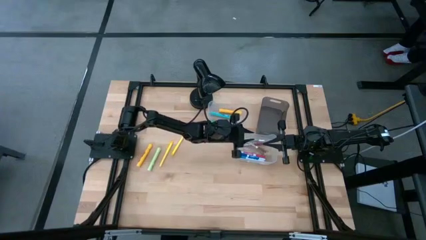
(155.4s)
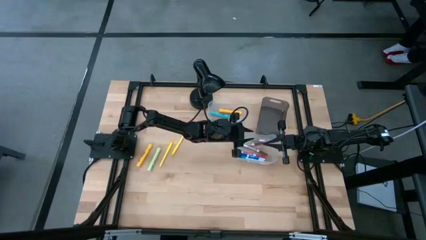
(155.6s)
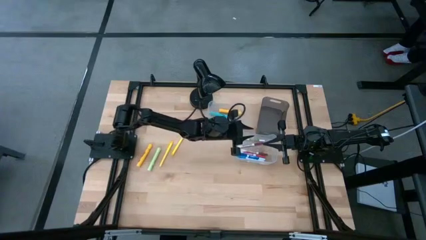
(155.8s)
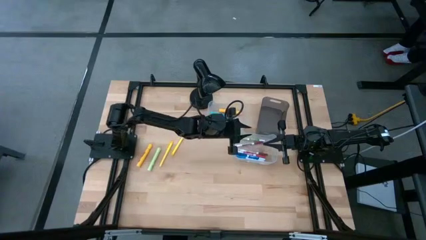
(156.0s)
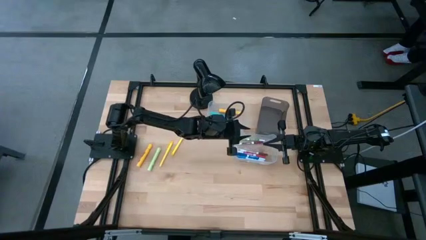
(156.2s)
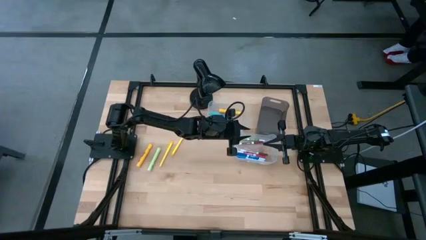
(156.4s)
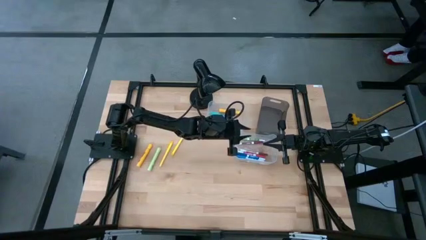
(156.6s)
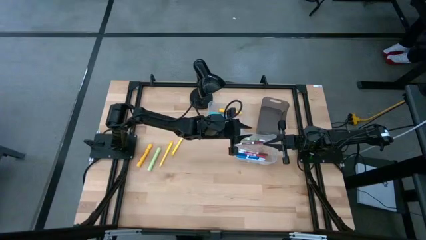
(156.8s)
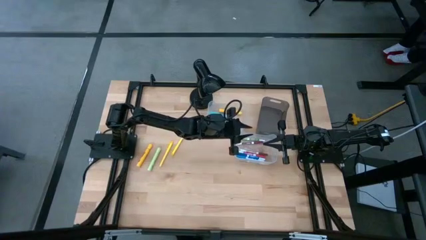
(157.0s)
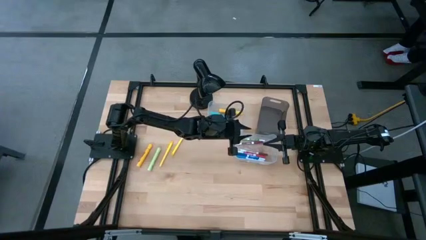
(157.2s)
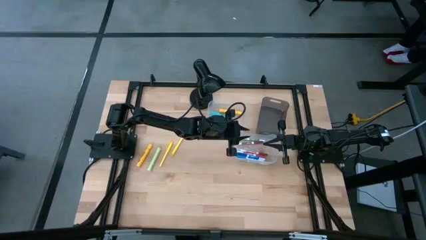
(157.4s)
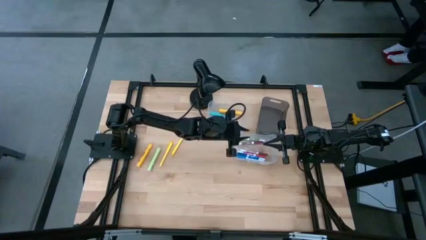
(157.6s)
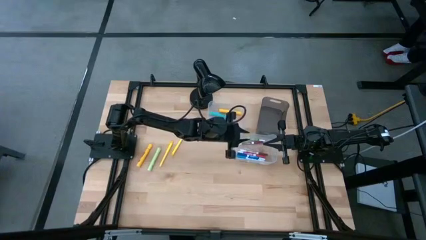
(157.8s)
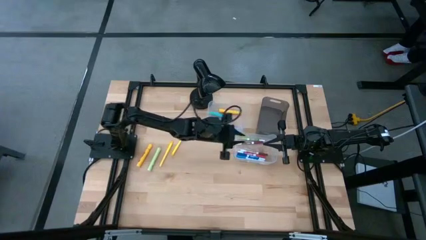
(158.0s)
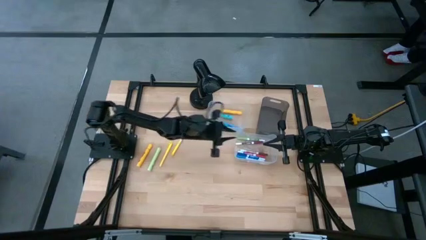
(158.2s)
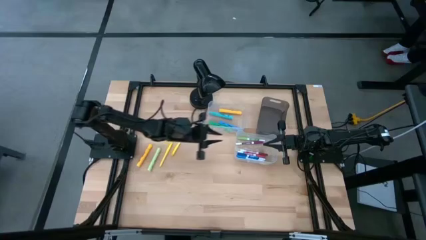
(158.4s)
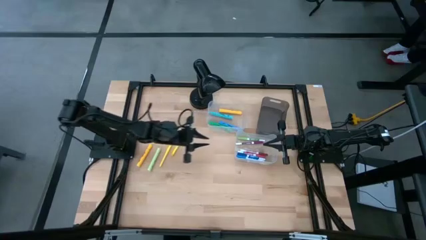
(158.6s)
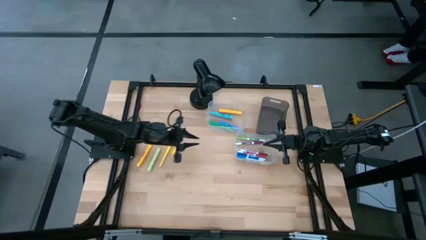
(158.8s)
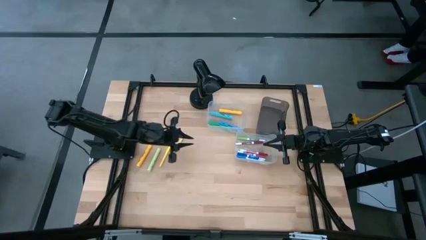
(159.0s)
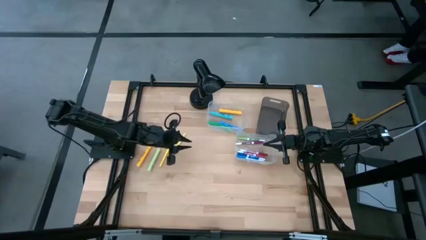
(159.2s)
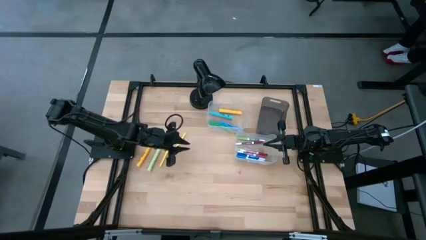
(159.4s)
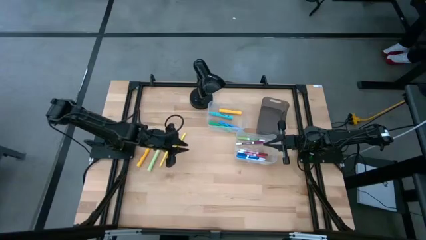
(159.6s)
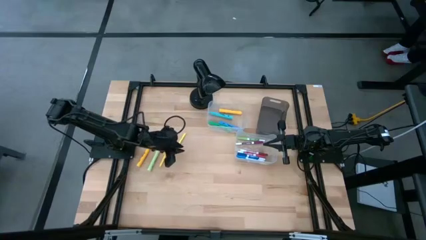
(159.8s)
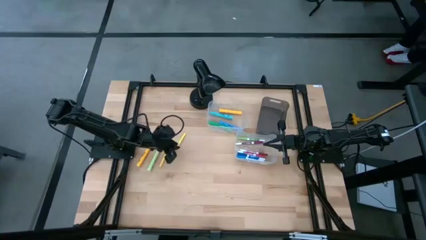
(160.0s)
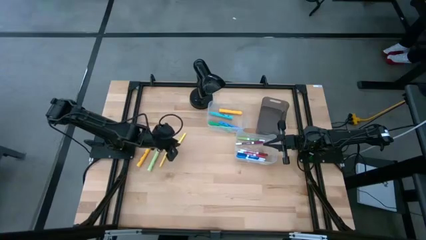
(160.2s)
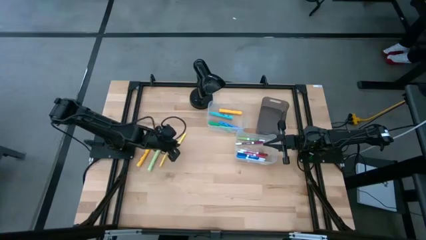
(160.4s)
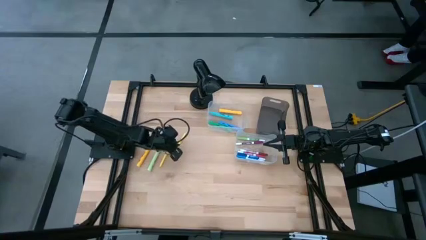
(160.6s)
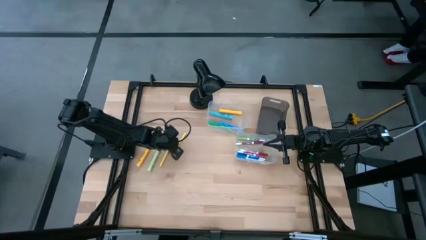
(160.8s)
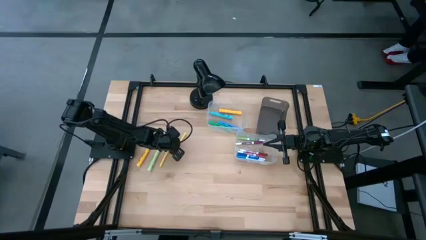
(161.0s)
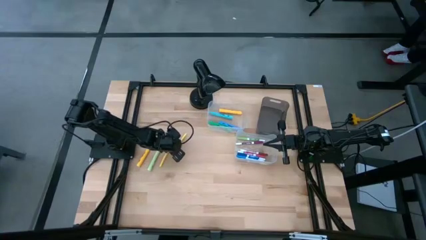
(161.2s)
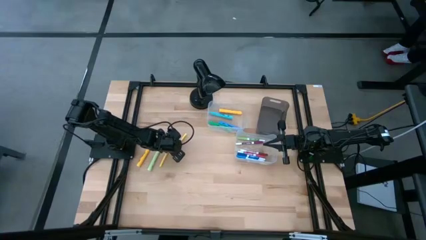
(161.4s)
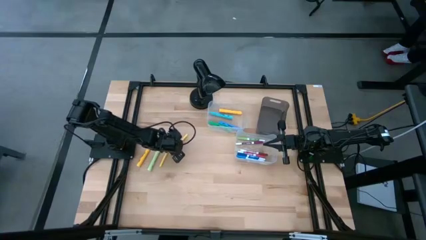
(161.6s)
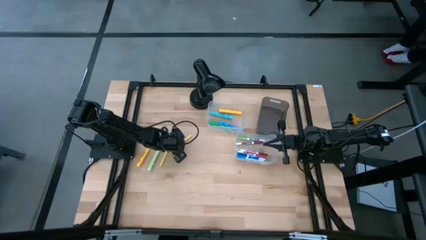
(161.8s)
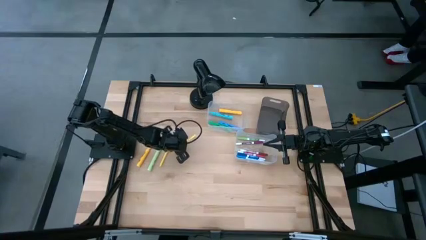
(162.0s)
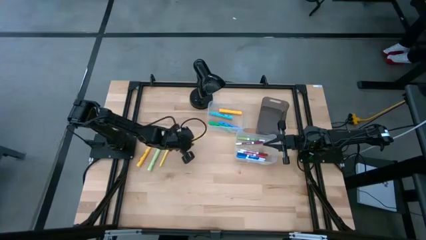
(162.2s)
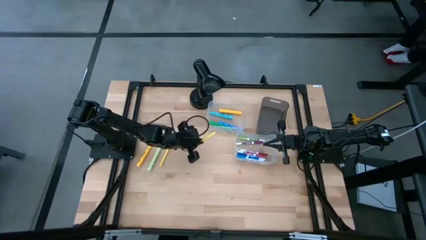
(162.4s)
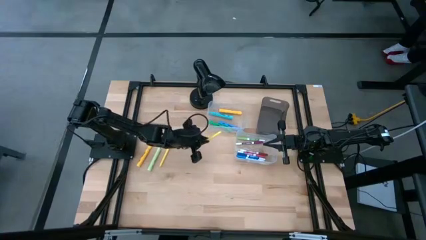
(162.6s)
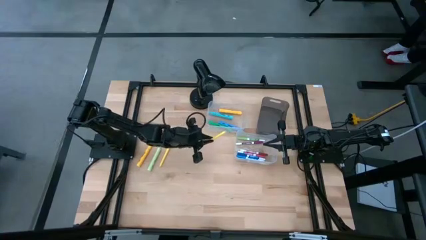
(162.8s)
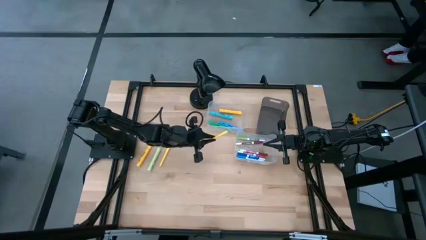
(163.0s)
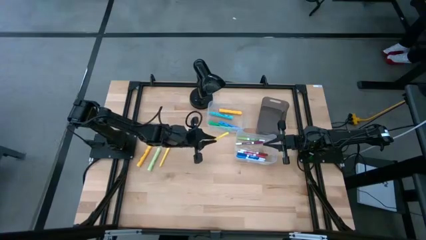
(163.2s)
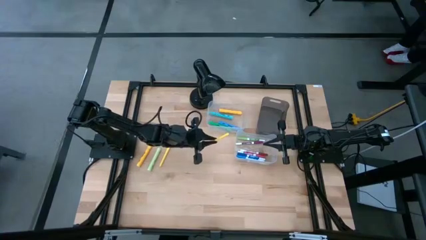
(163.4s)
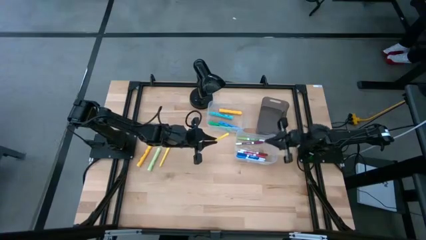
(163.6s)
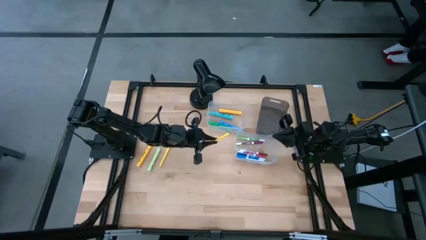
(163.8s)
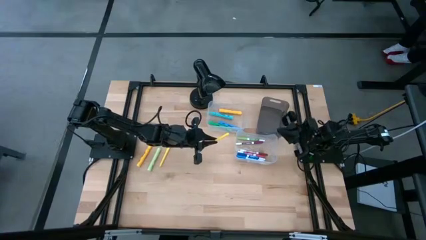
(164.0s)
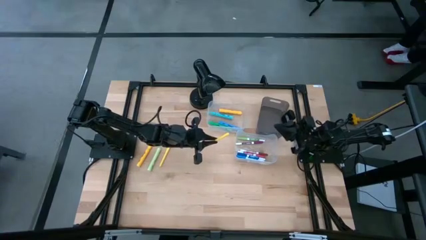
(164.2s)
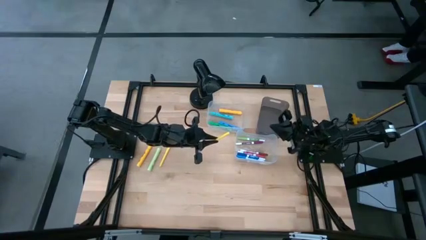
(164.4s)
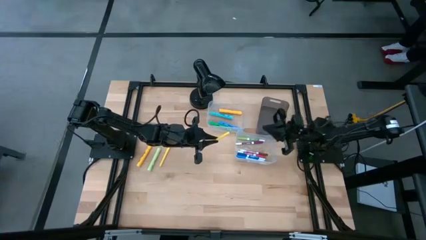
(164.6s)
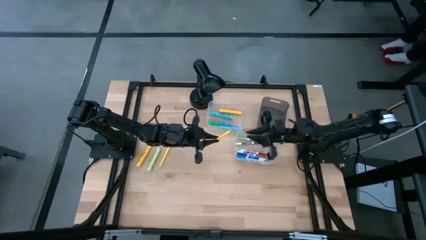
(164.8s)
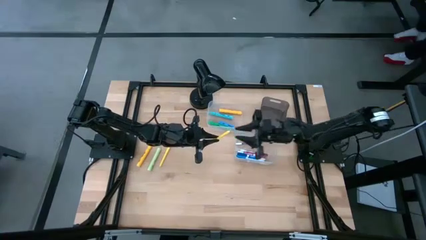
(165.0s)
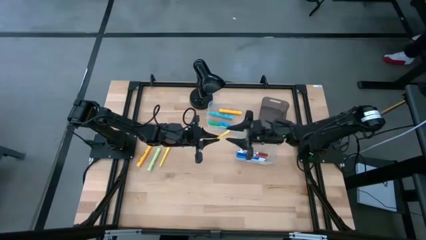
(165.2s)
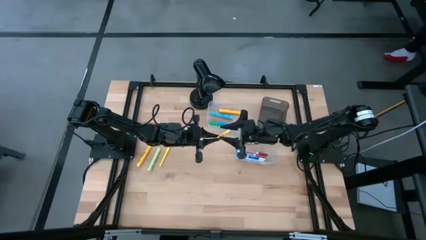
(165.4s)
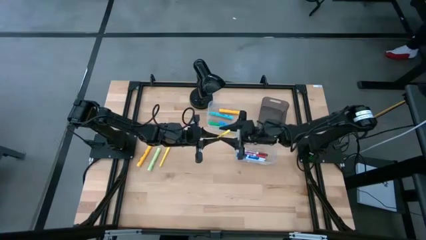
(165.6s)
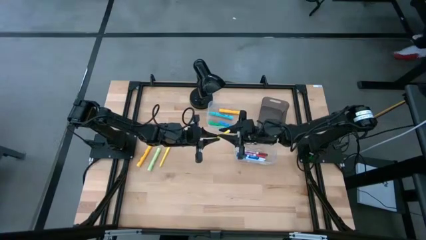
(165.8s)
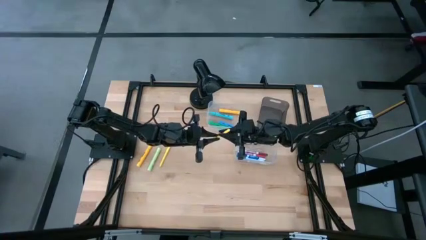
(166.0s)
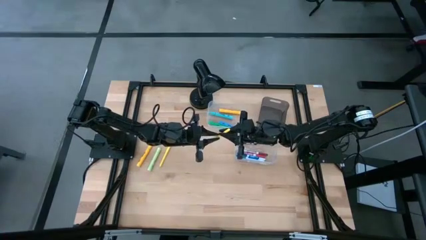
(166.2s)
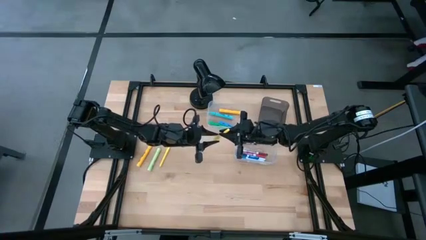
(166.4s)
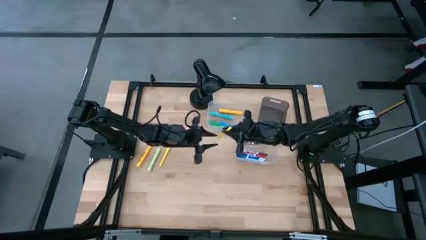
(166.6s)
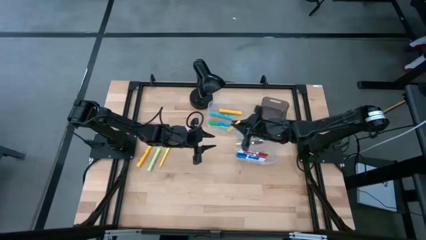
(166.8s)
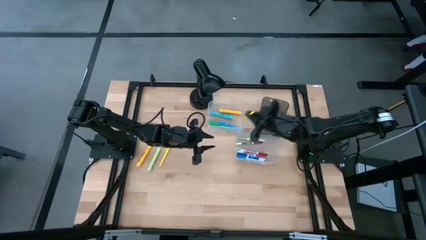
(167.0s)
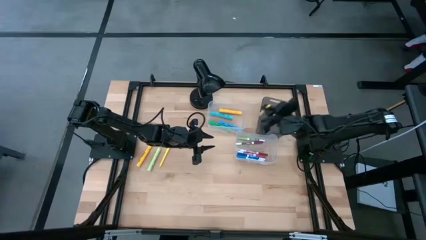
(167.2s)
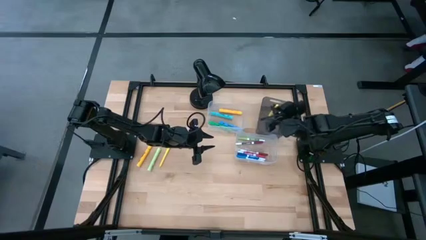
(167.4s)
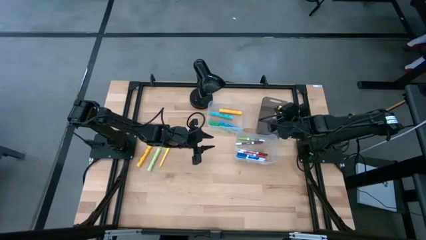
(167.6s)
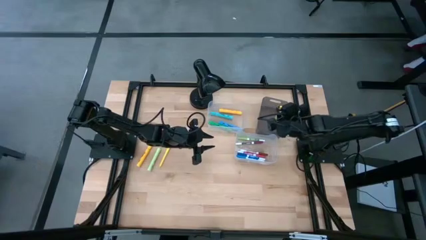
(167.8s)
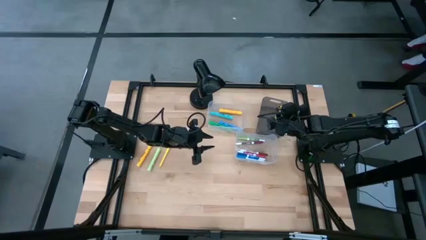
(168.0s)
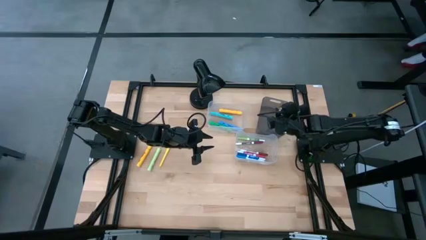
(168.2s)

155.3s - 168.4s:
Task: Pick & Place Markers
Put the right yellow pen into the black transparent bin

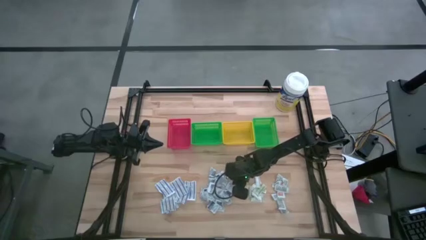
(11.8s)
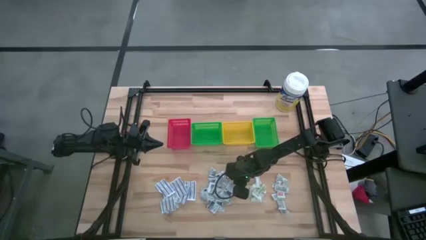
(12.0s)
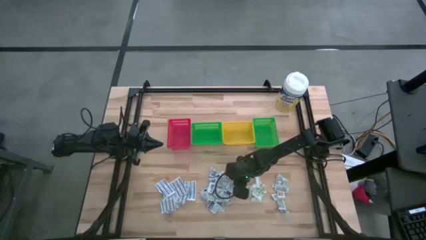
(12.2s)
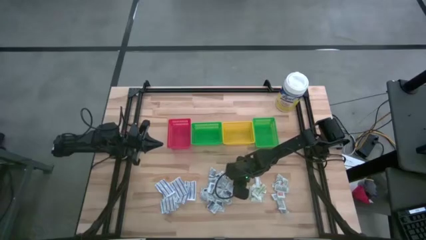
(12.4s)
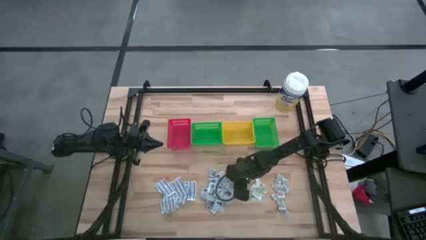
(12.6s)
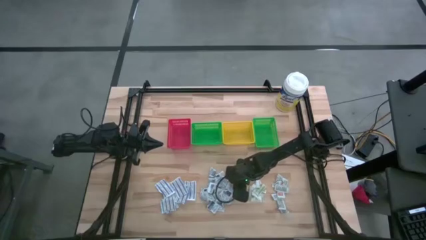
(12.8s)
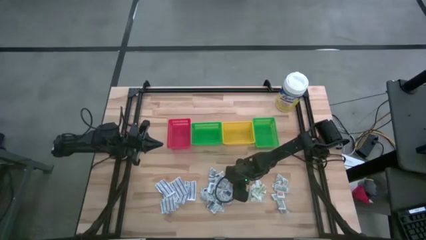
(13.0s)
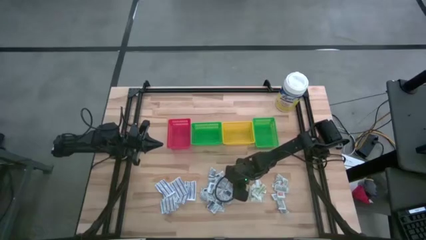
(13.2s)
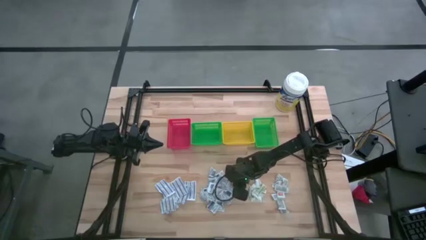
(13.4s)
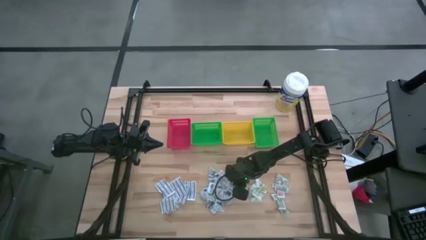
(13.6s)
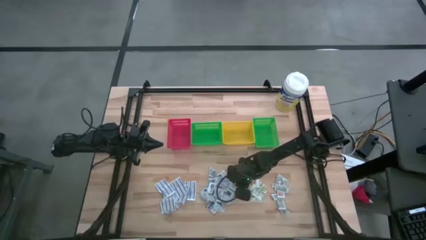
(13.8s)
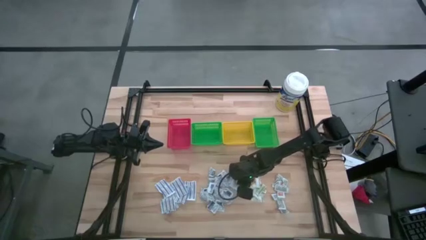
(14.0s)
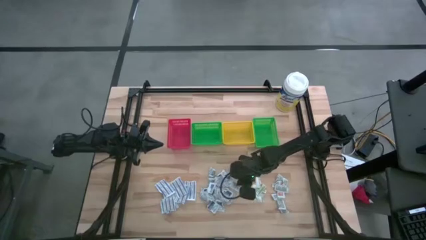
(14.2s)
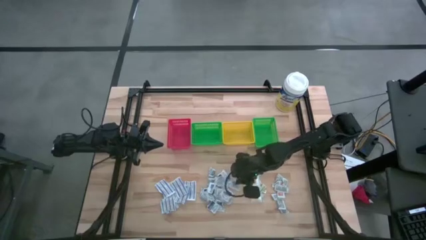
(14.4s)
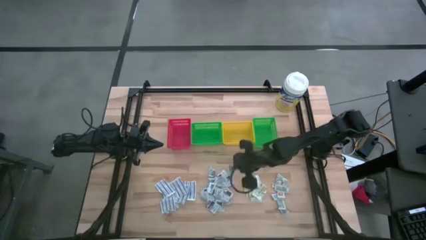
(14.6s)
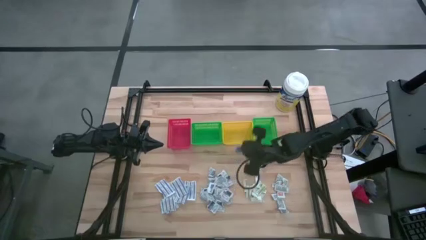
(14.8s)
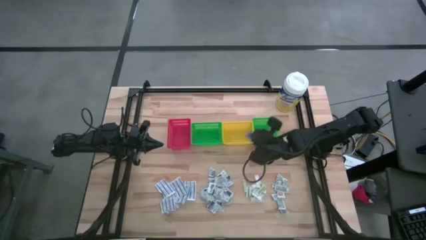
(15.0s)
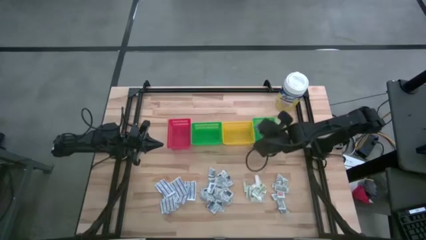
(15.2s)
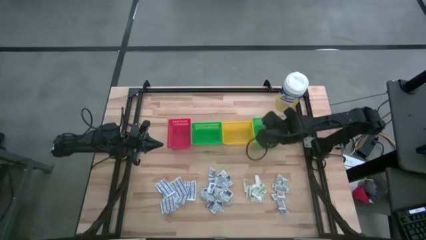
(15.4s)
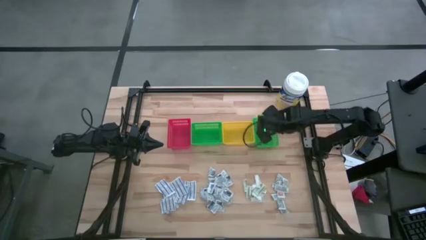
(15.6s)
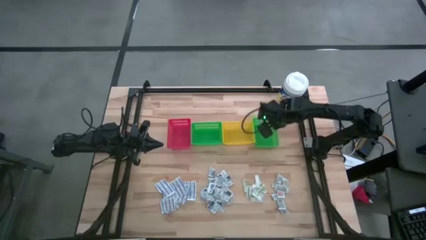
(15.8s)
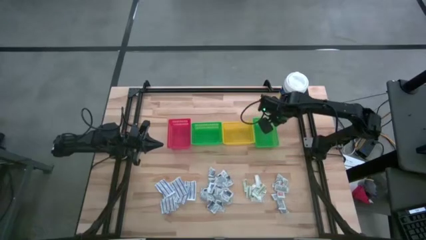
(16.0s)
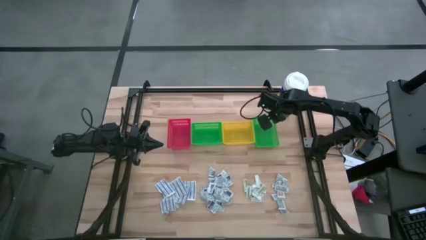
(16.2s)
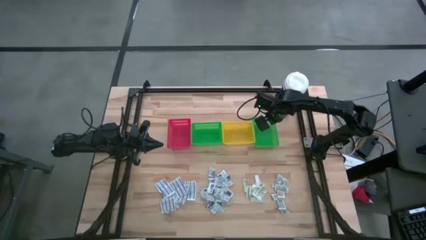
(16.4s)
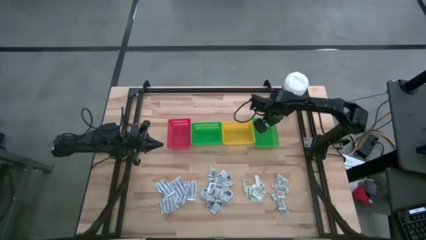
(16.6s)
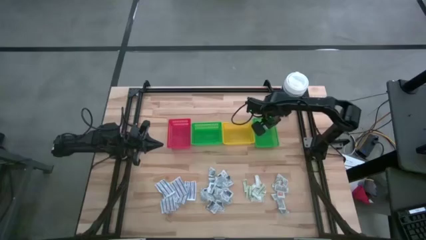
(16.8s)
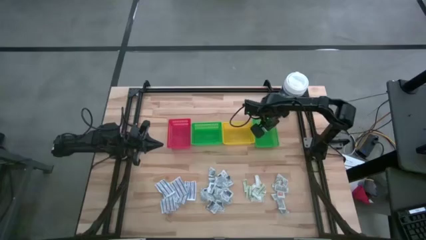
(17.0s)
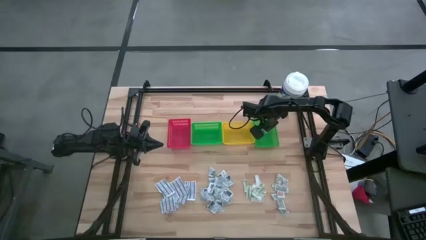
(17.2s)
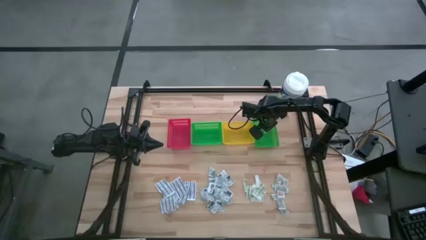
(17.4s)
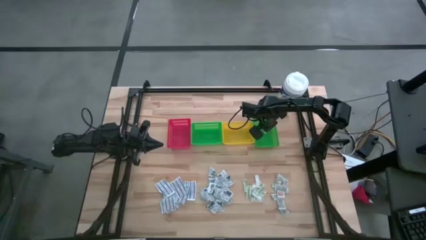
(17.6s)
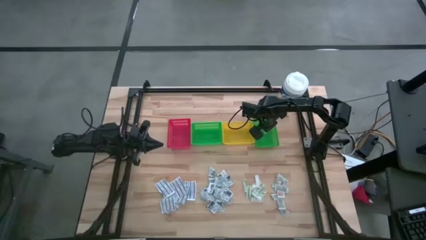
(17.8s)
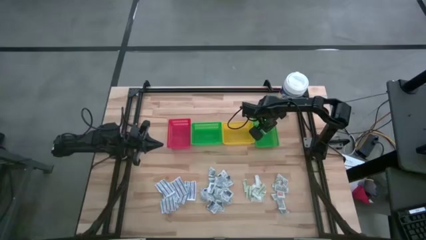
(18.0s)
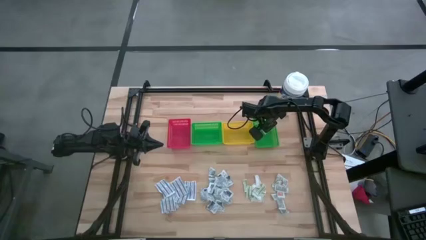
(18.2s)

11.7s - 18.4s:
Task: Pick & Place First Aid Supplies
Put the blue alcohol pad into the right green bin
